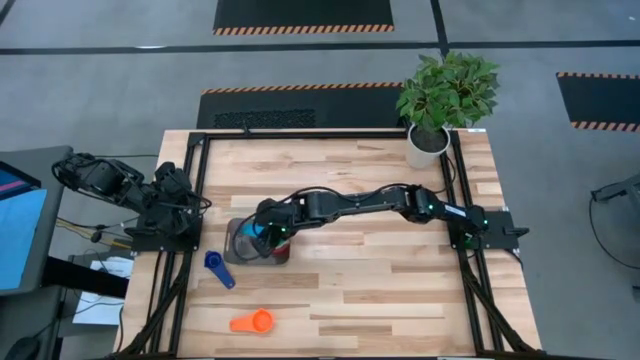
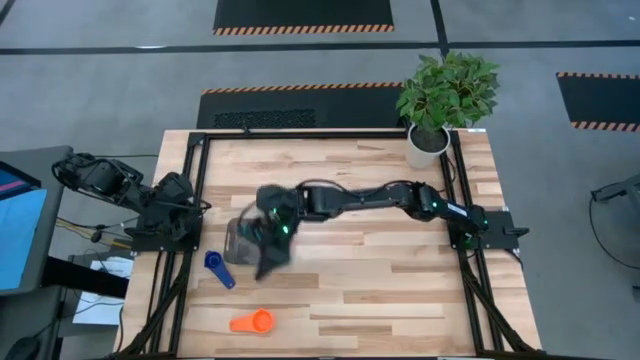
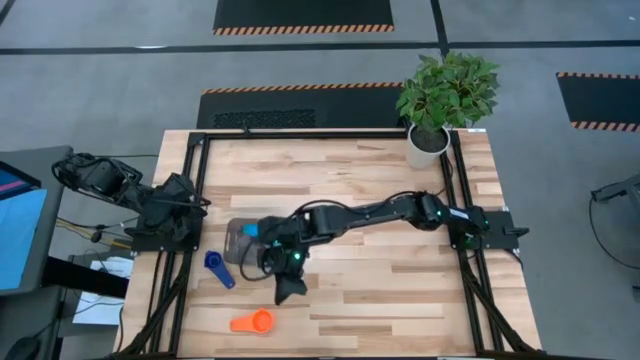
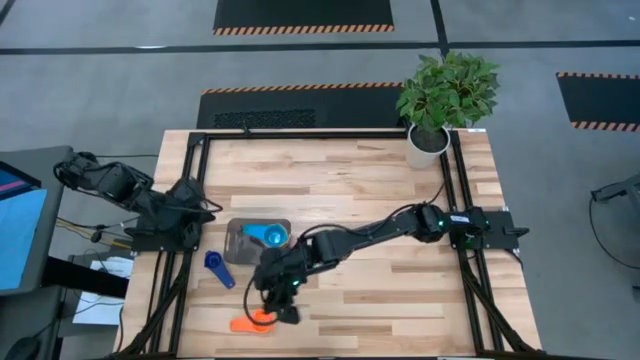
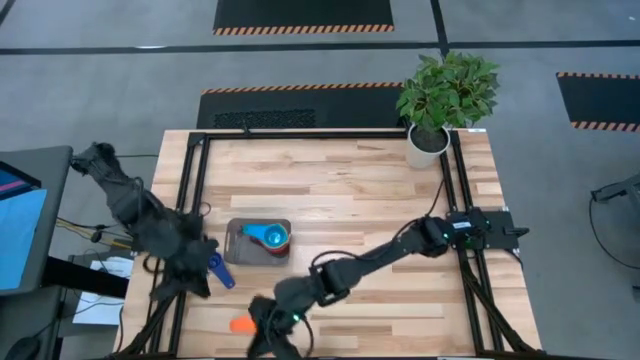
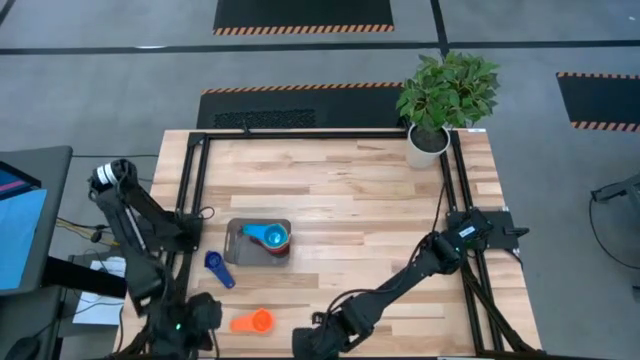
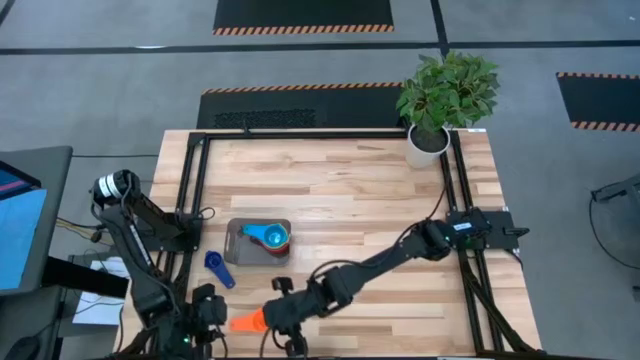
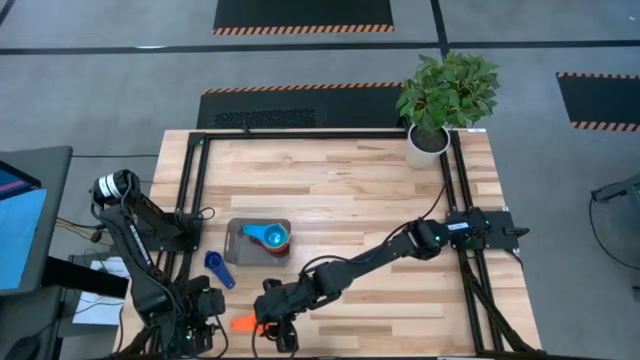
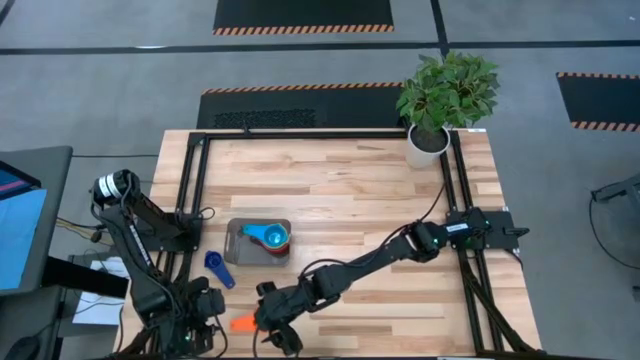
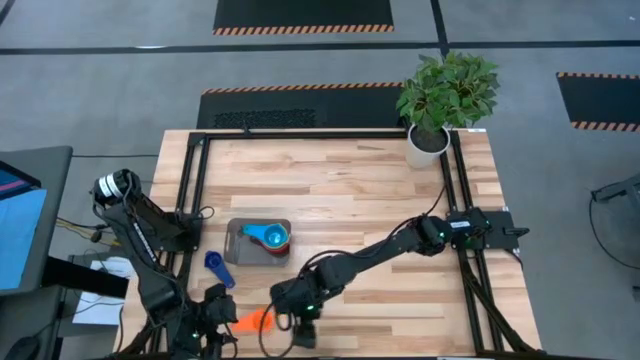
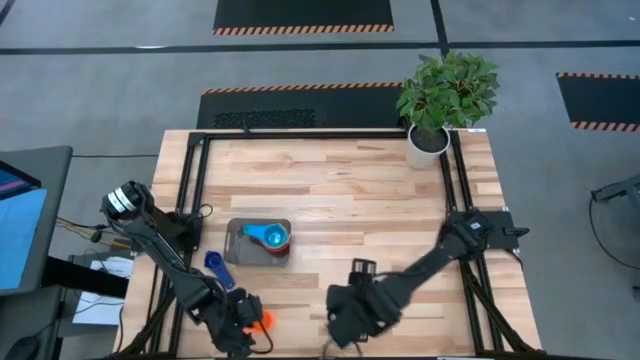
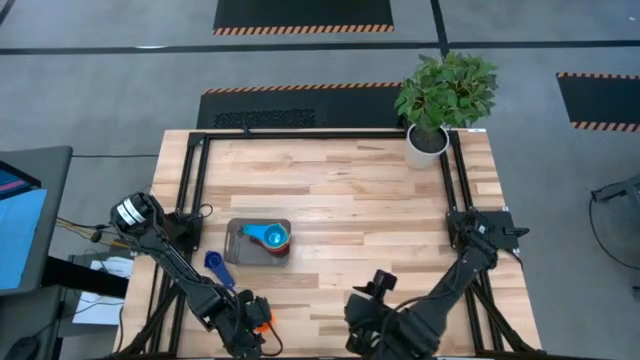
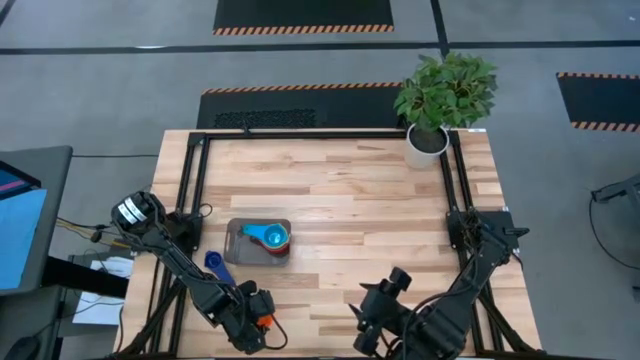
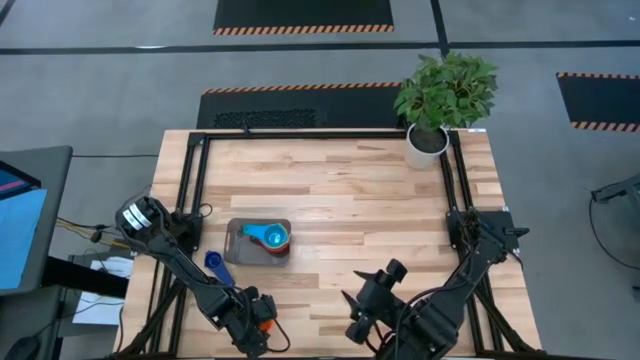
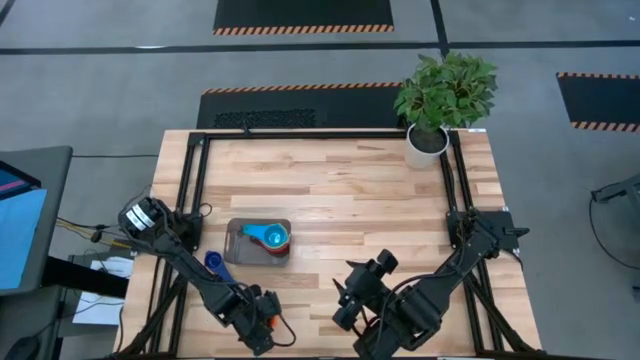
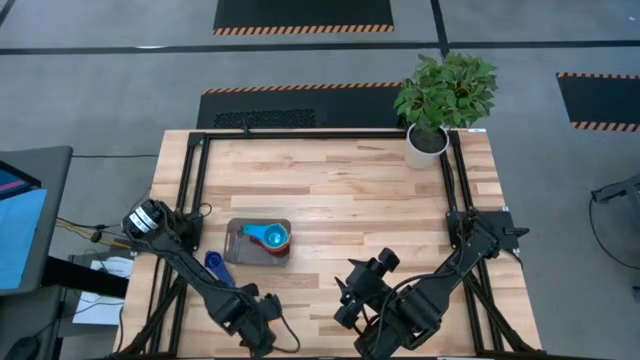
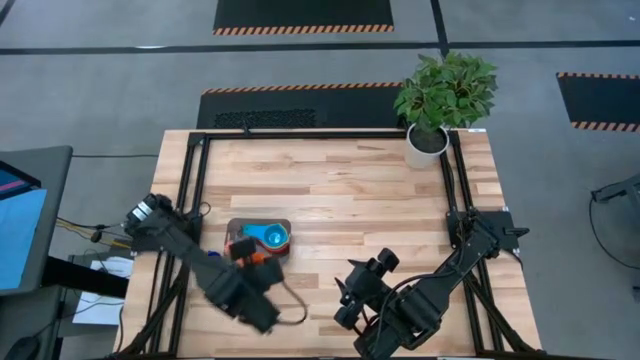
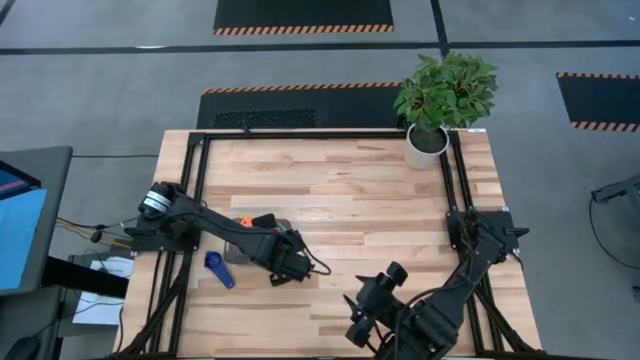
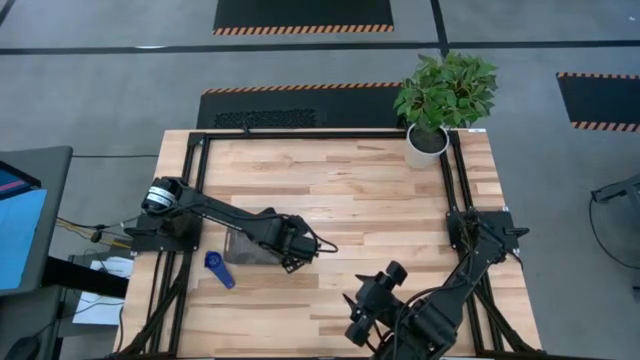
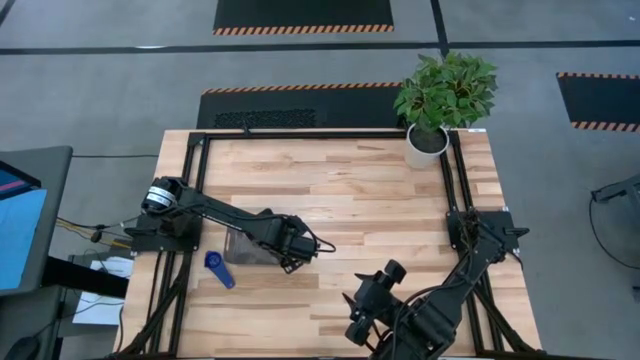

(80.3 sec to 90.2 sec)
Task: Nest measuring cups in basket
Stack the orange measuring cup on top of the light blue measuring cup in the black bin

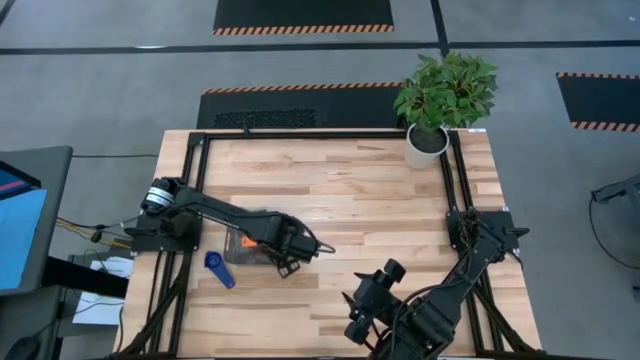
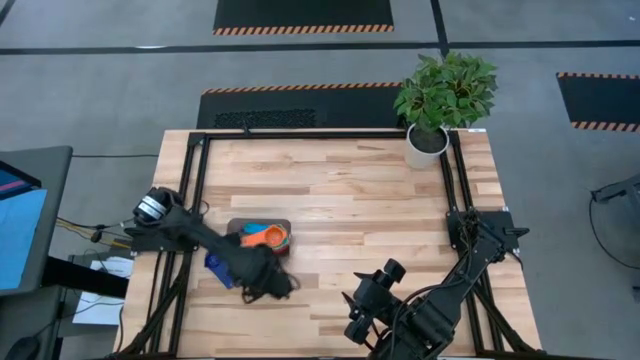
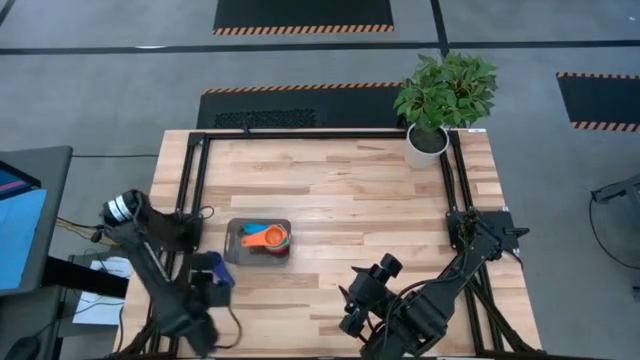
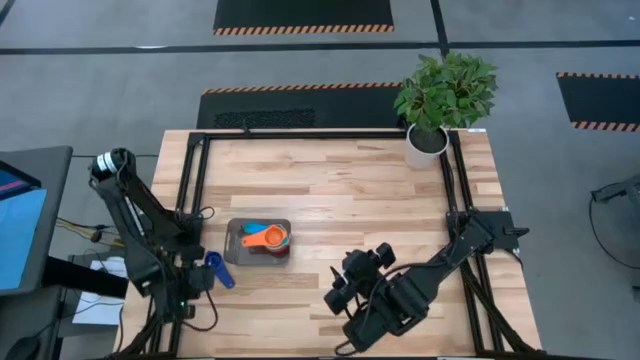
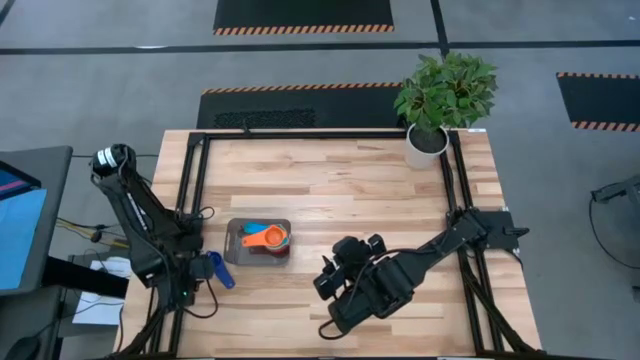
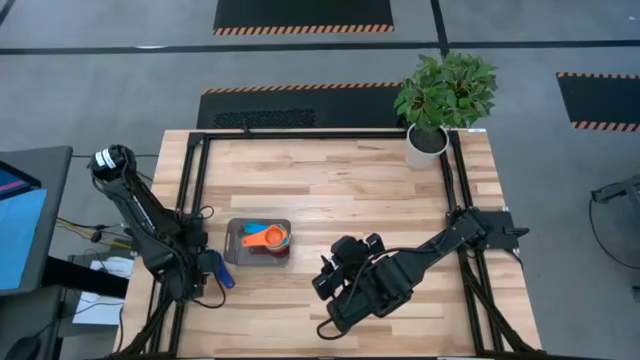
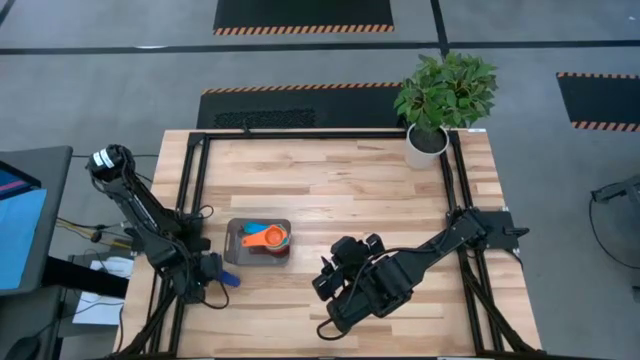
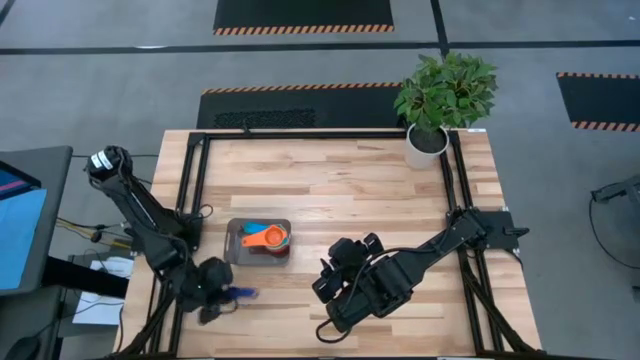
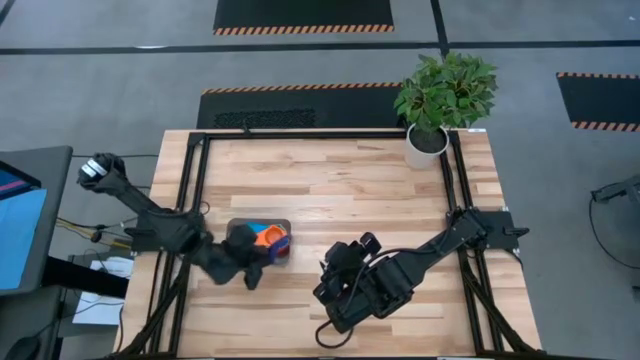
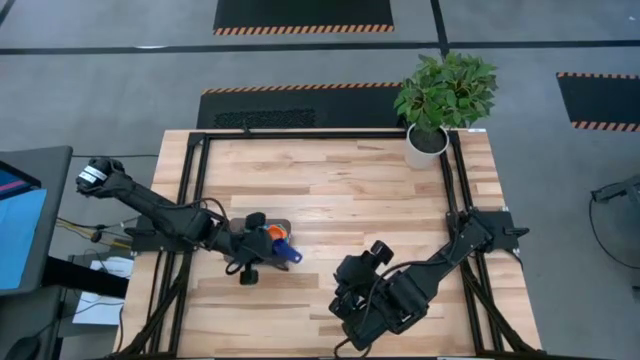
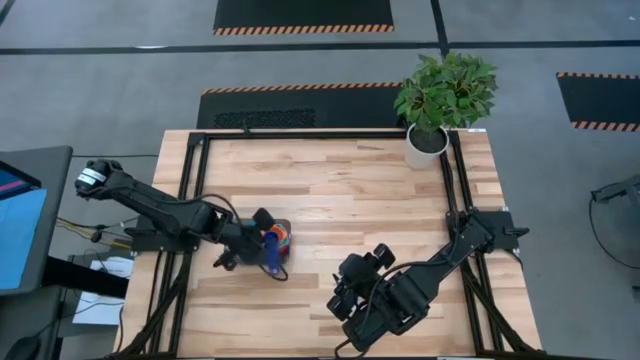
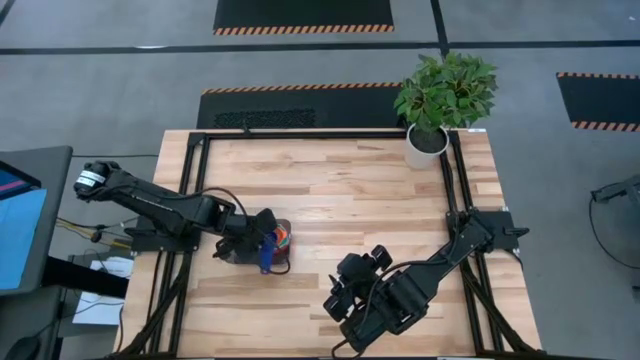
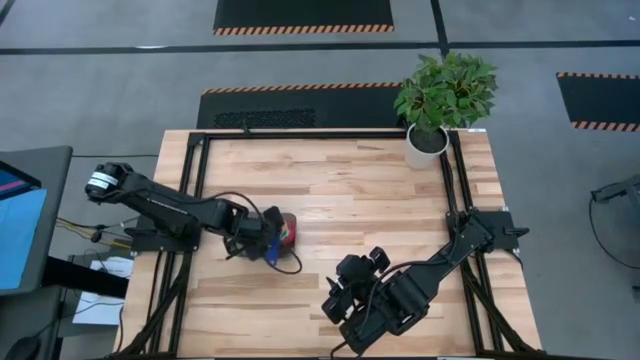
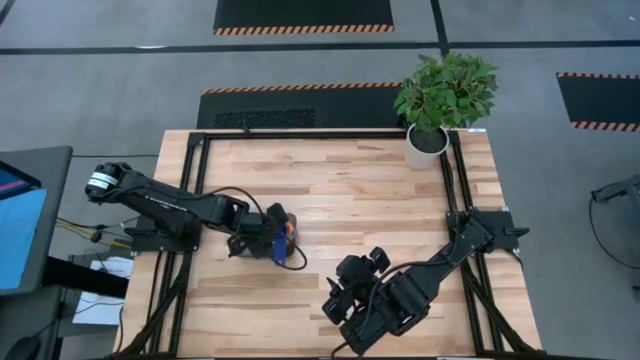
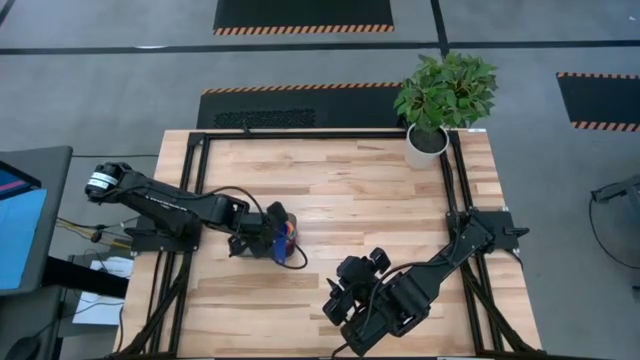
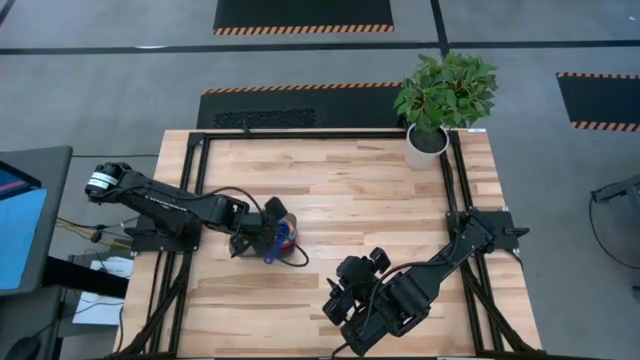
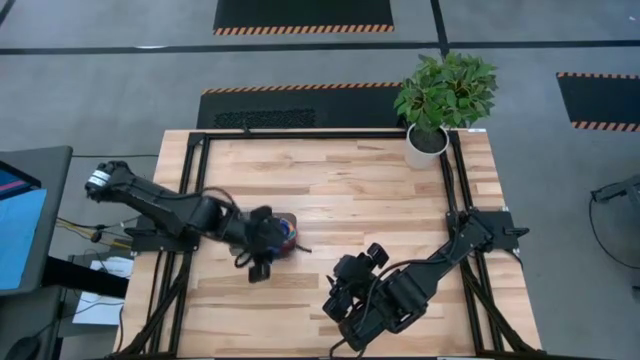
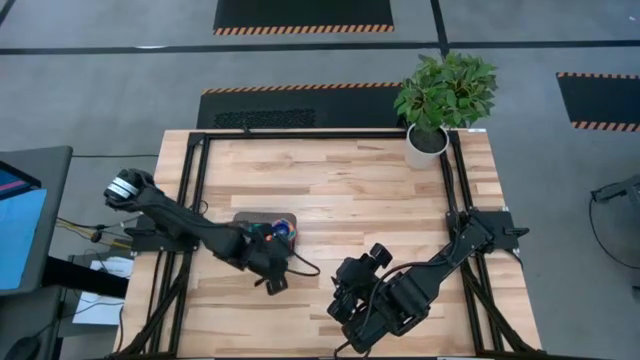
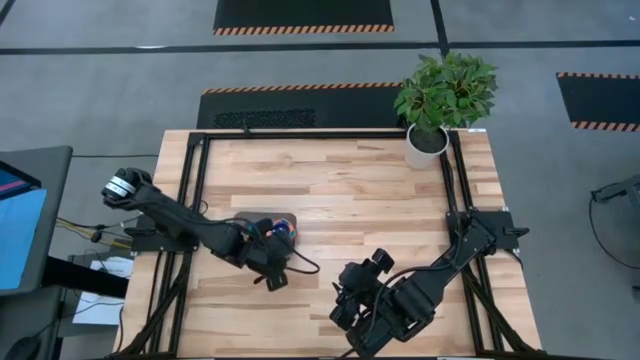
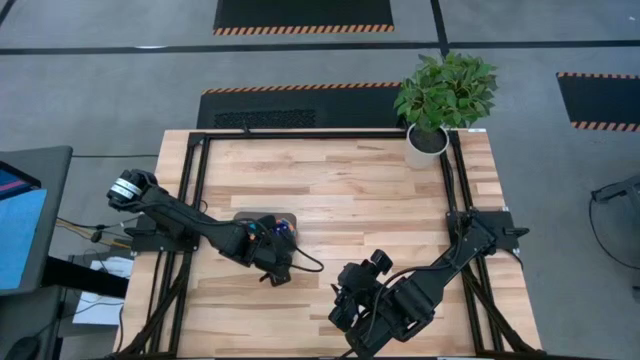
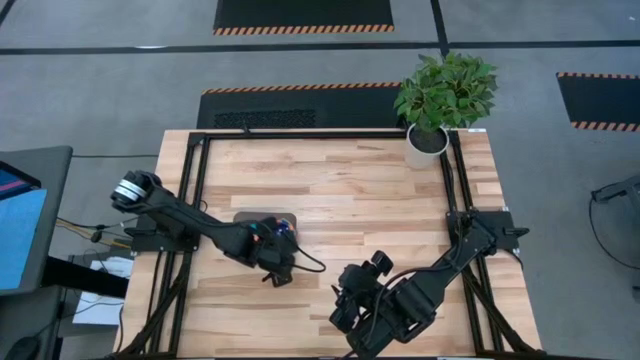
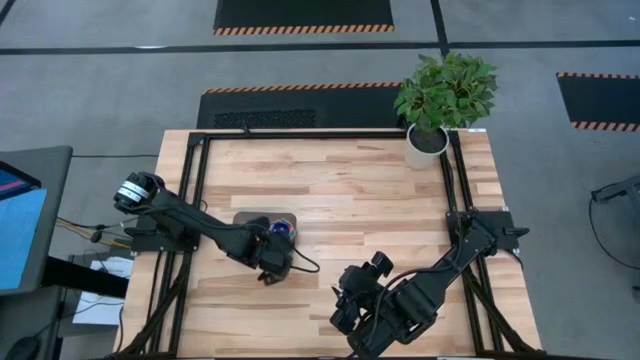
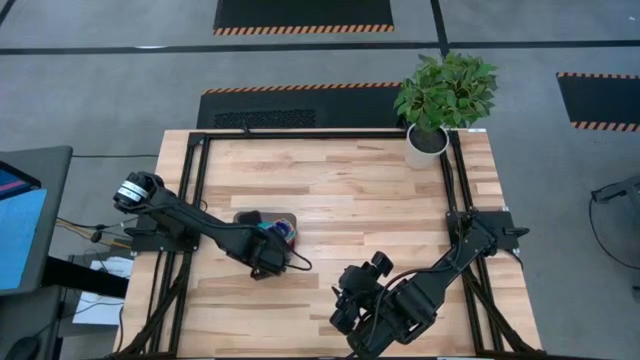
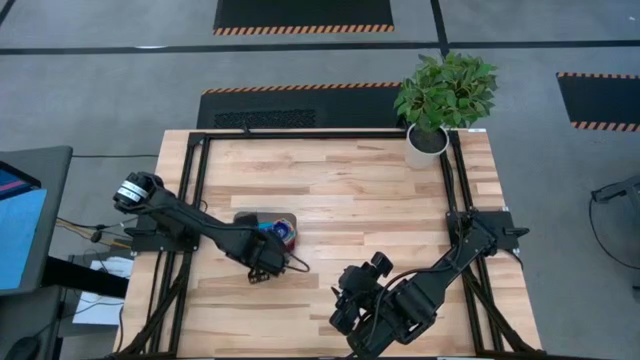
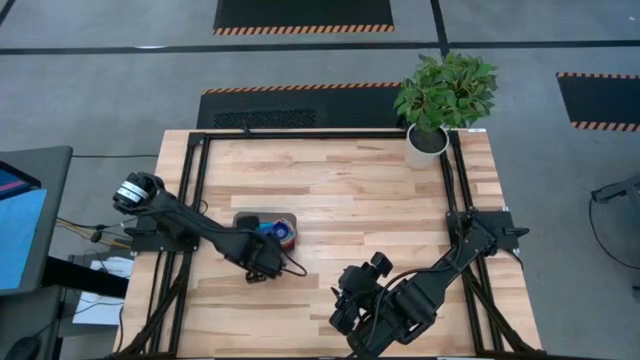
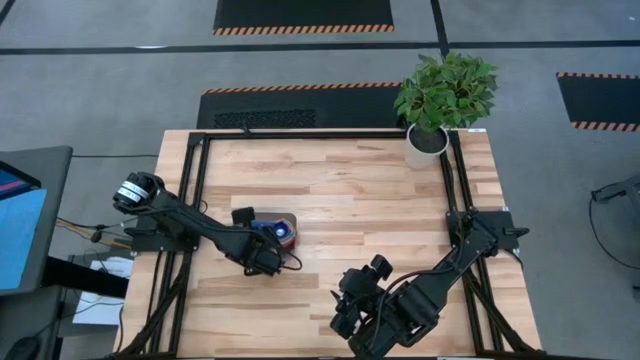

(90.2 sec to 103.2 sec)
Stack the dark blue measuring cup on top of the orange measuring cup in the black bin
